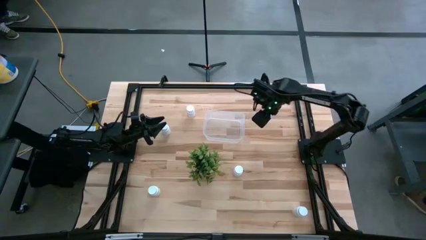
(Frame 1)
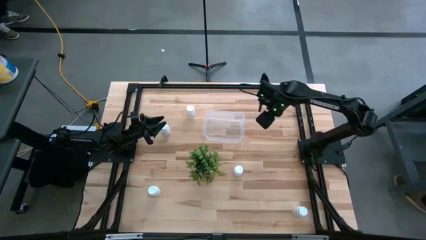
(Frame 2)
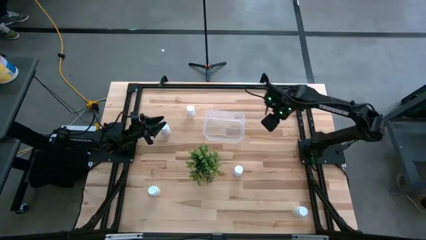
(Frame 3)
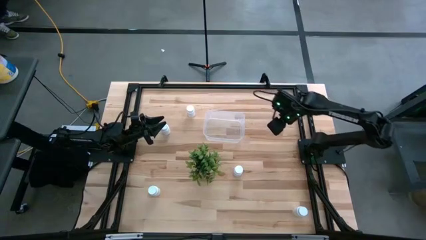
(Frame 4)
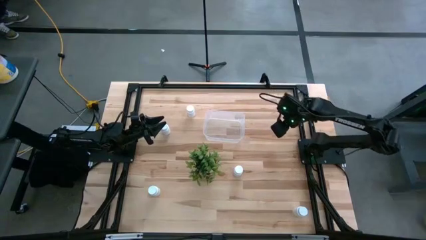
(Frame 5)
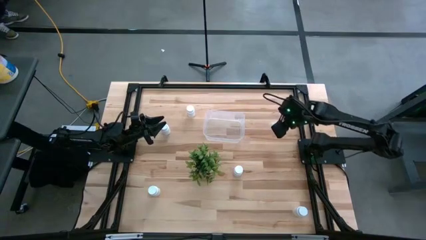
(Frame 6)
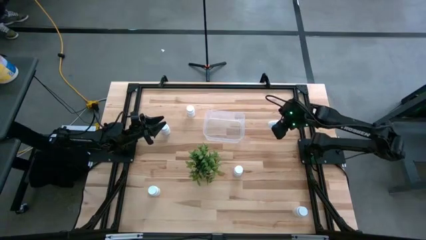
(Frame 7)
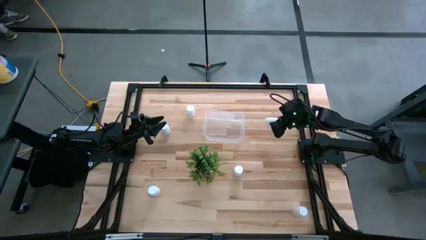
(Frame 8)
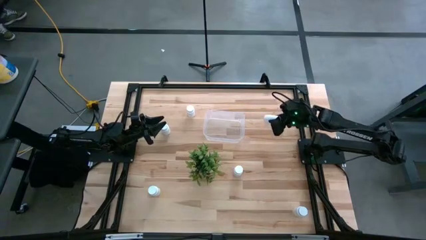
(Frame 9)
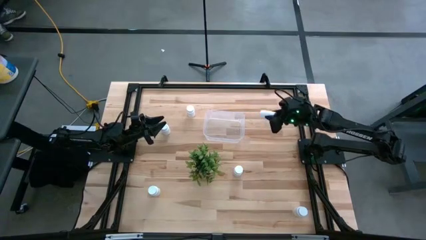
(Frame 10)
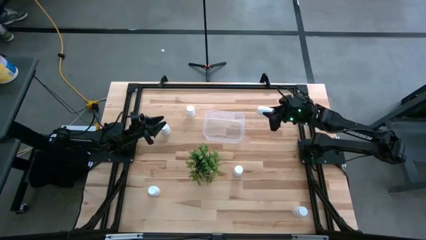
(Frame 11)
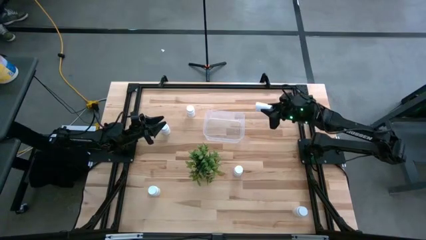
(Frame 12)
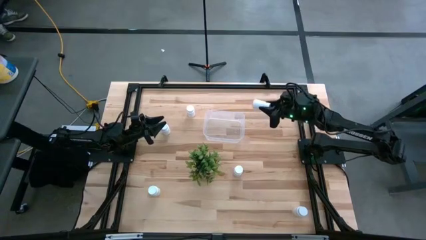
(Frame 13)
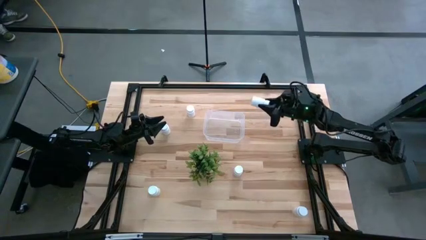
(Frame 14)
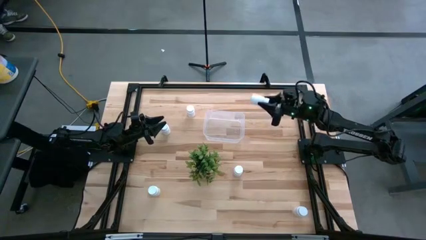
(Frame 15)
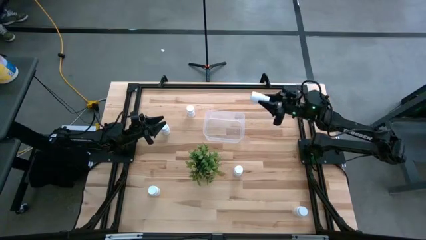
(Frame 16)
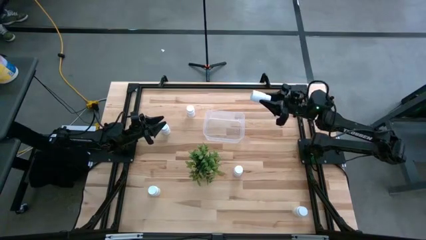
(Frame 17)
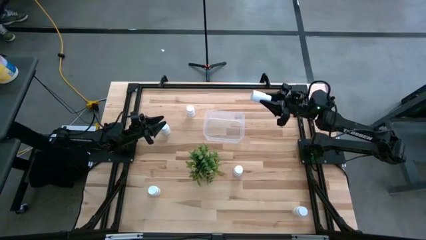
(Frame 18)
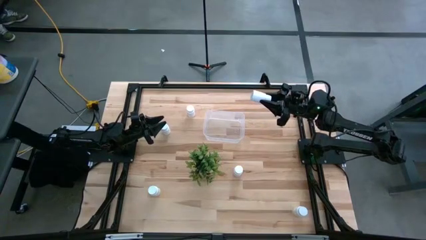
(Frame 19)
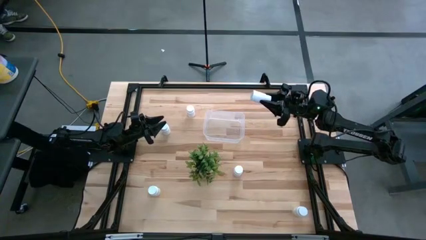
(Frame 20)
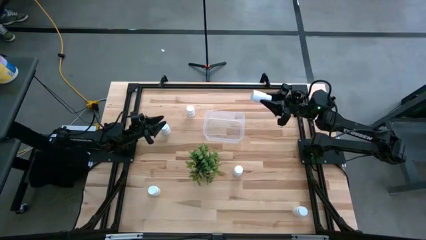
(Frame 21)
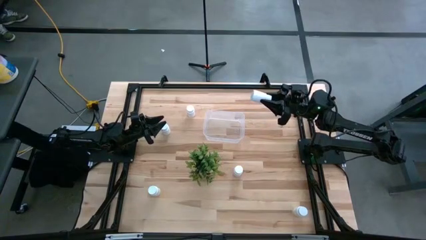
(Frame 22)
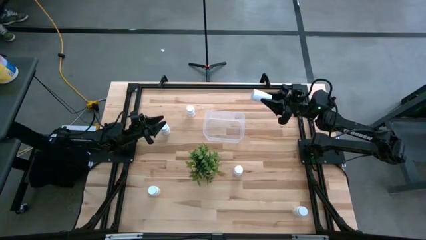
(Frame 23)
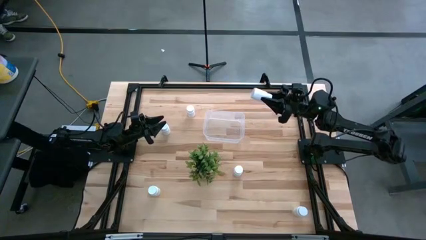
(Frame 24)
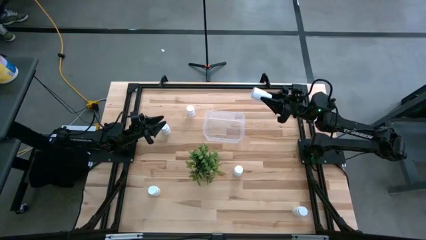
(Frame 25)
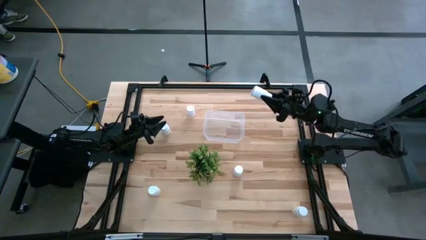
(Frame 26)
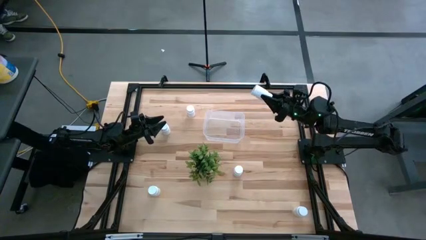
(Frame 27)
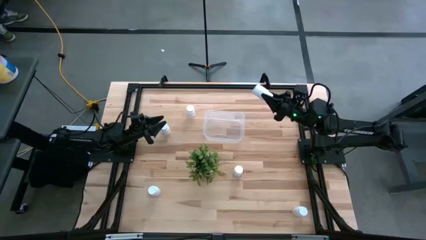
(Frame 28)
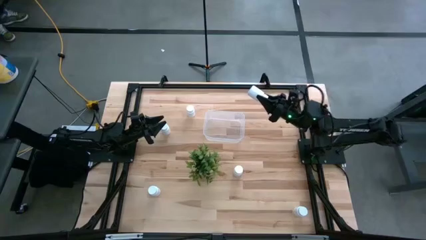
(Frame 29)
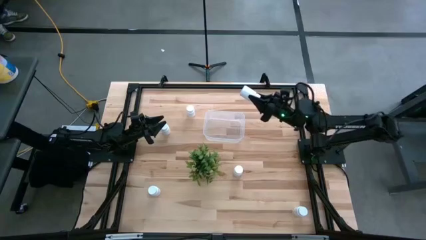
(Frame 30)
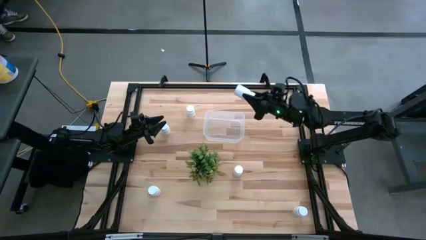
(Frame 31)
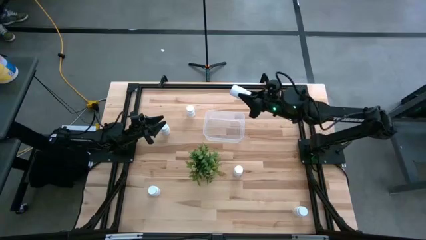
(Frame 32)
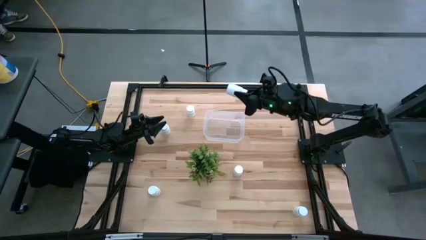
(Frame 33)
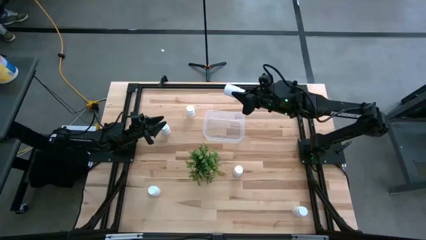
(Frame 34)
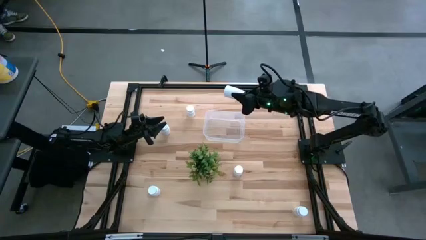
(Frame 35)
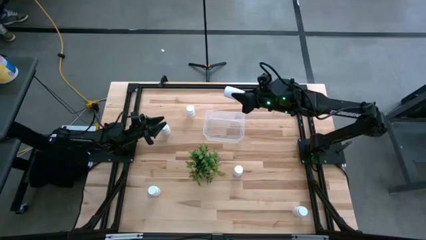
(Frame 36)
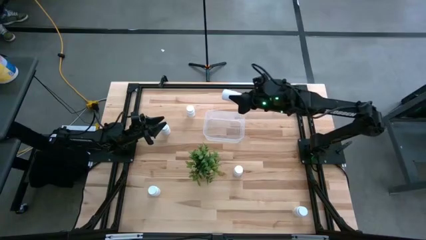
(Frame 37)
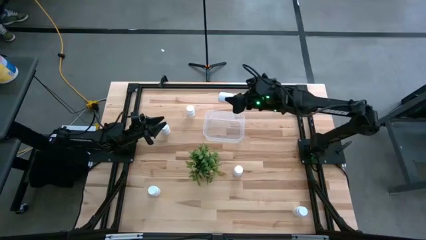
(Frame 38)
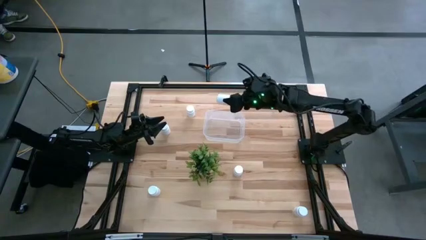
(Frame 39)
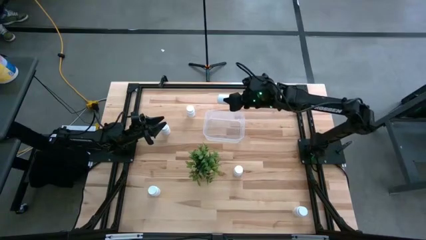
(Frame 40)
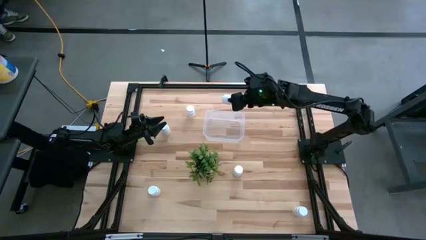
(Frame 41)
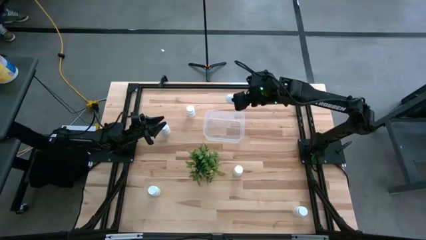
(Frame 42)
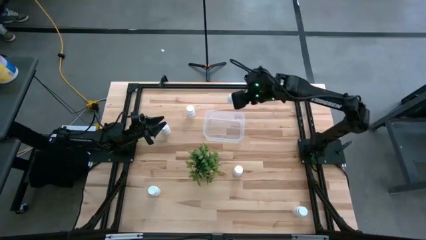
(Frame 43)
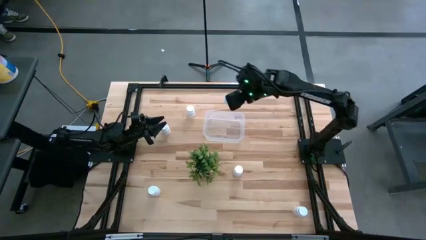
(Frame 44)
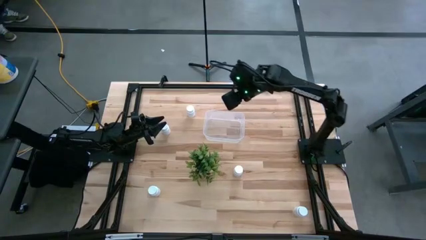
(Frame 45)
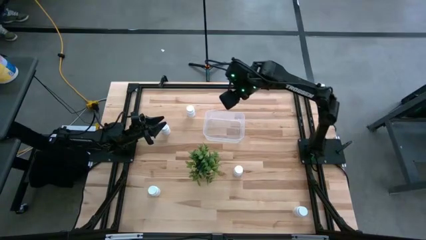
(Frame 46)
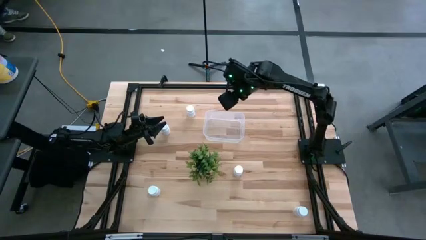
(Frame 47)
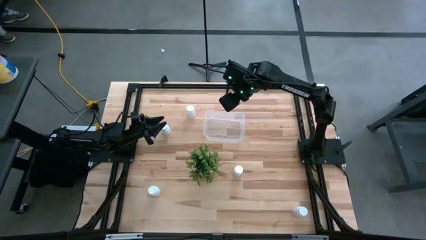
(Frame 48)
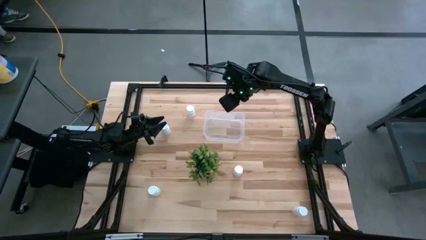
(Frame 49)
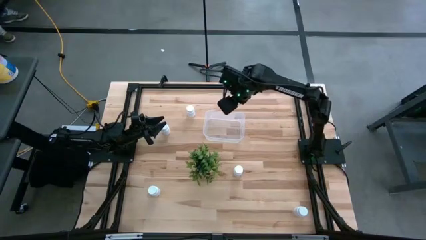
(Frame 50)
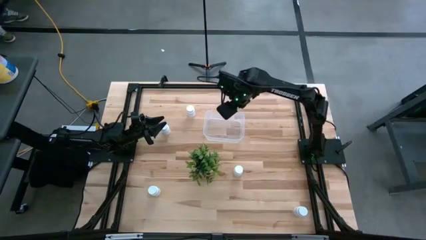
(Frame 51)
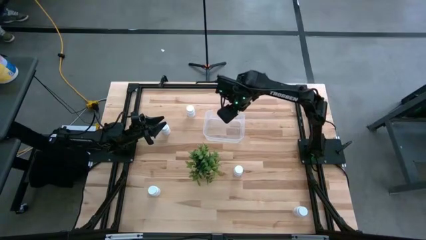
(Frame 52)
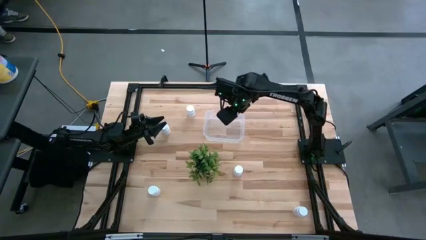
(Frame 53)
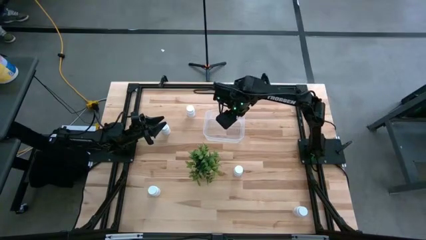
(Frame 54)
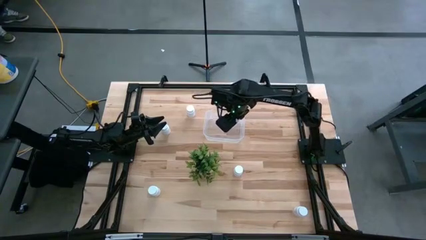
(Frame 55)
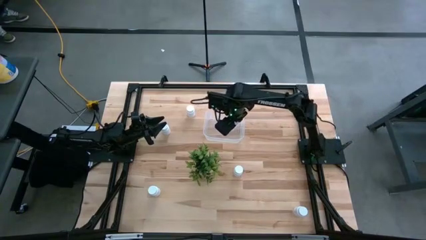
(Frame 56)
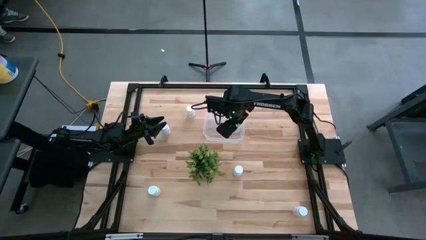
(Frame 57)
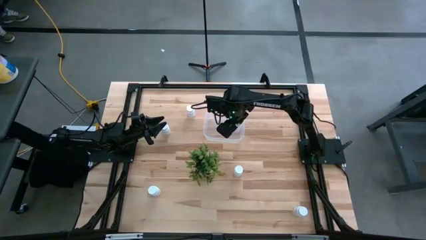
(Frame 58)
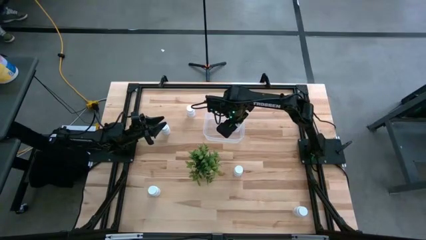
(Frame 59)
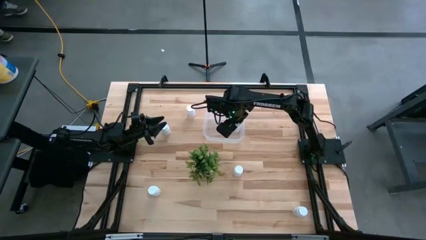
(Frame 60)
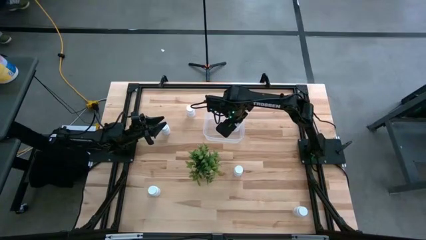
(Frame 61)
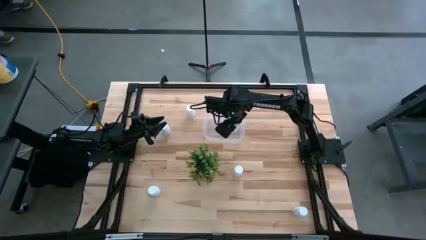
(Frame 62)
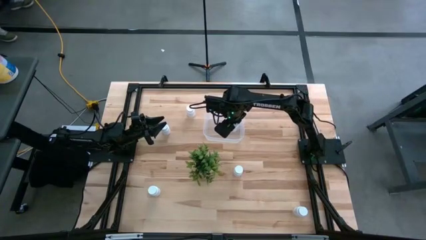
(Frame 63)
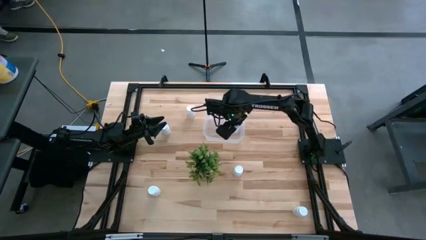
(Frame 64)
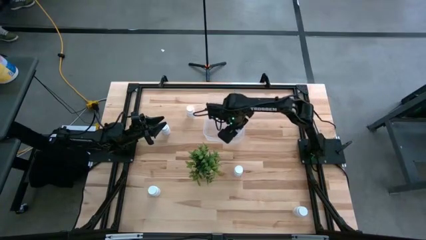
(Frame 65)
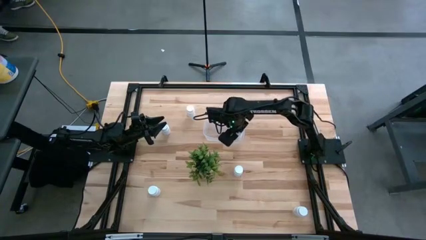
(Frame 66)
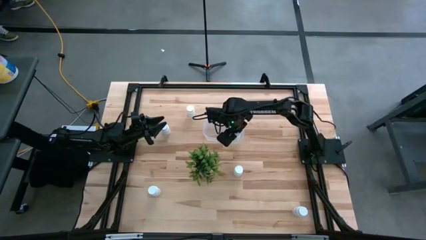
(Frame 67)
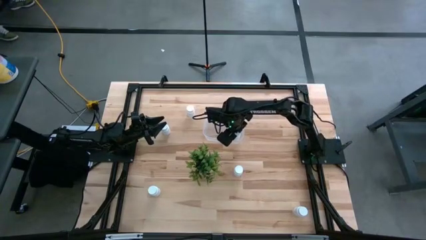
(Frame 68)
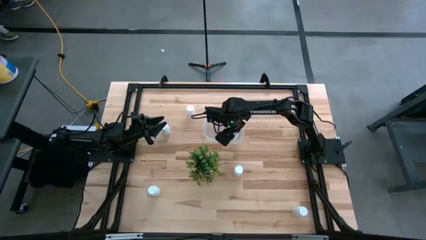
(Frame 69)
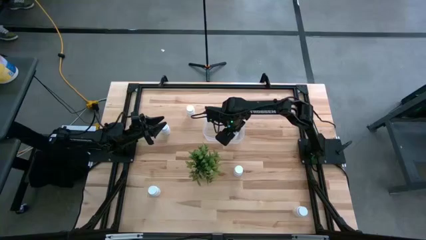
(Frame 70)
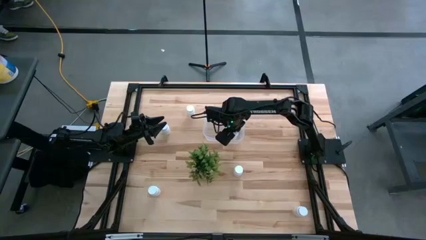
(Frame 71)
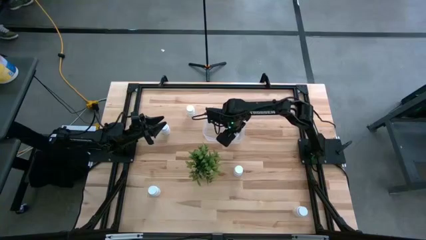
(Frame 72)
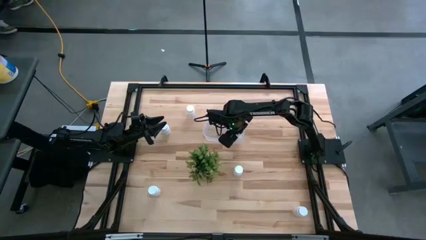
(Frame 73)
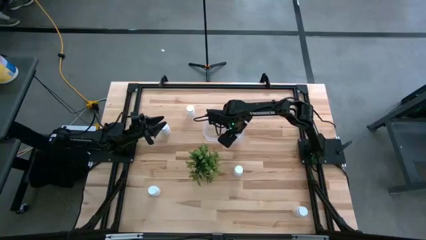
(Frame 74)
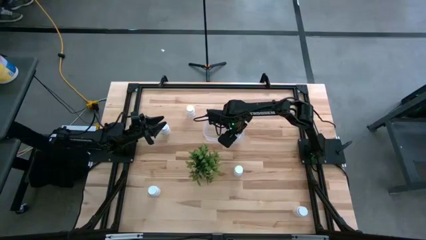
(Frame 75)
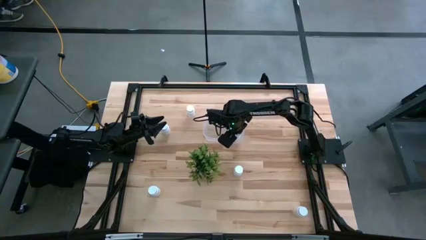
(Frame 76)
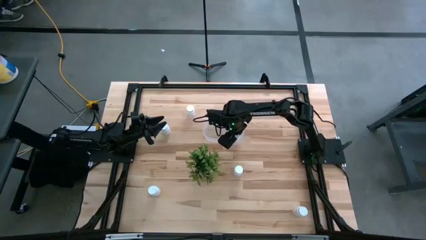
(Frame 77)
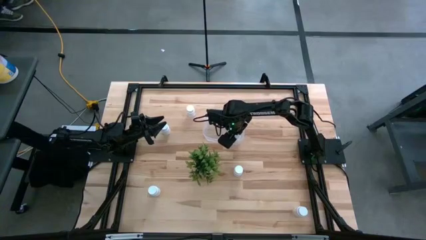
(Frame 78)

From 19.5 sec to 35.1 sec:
Task: Pick and place pill bottles into a basket
Put the white pill bottle in the transparent bin
